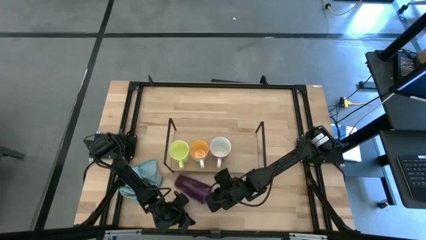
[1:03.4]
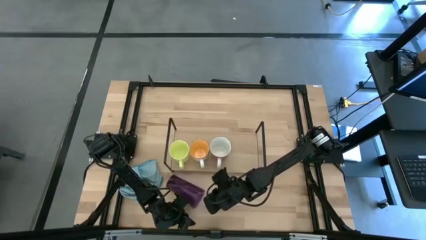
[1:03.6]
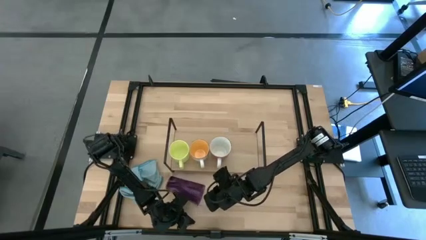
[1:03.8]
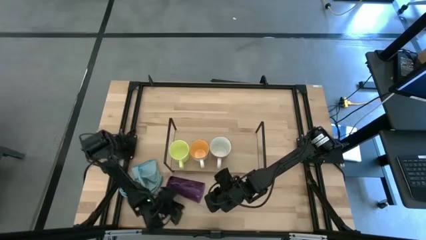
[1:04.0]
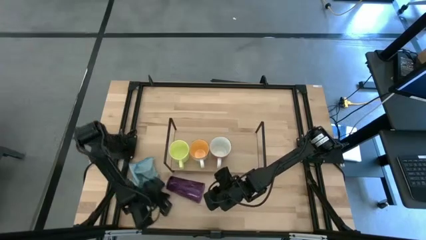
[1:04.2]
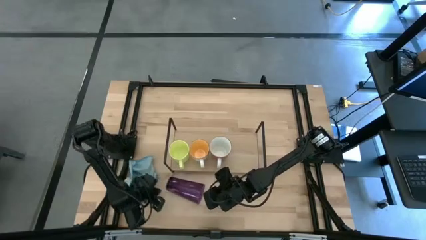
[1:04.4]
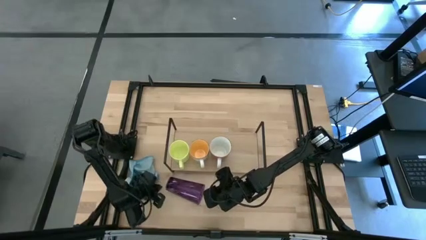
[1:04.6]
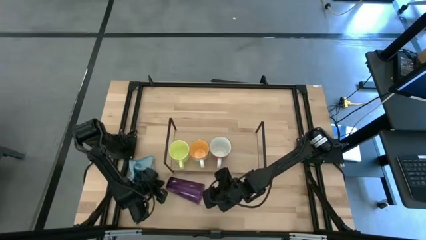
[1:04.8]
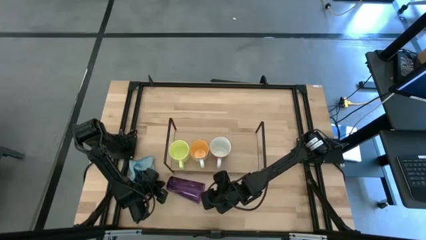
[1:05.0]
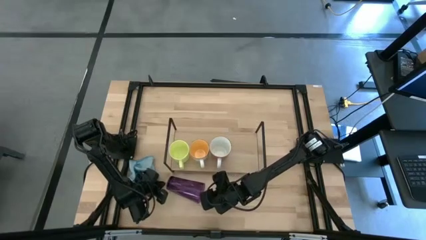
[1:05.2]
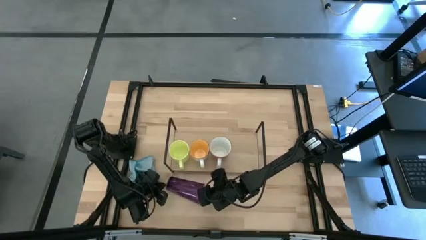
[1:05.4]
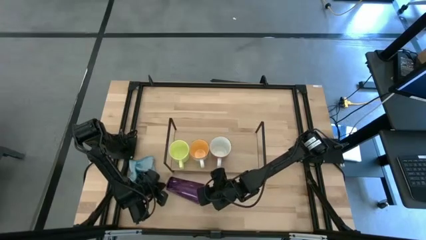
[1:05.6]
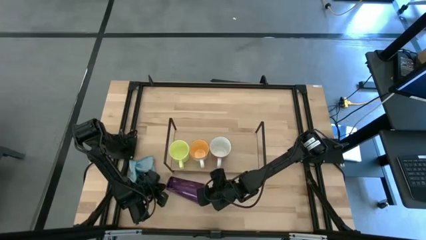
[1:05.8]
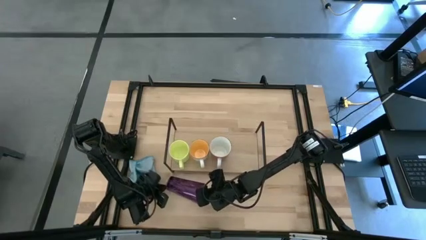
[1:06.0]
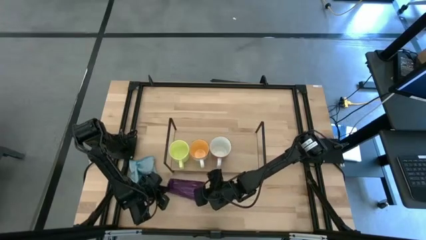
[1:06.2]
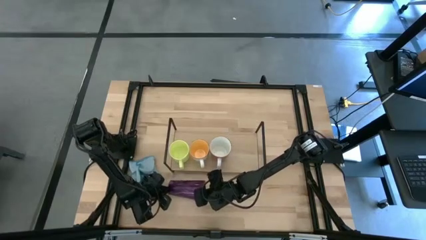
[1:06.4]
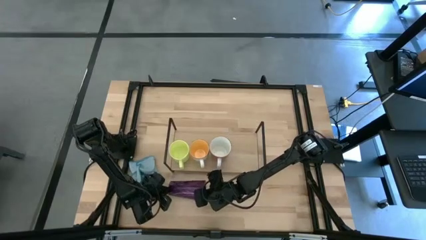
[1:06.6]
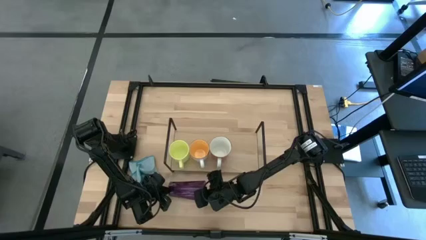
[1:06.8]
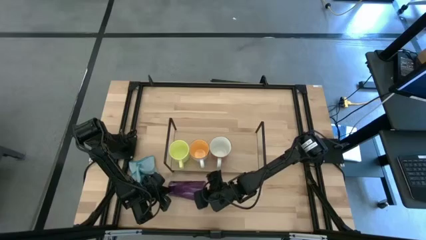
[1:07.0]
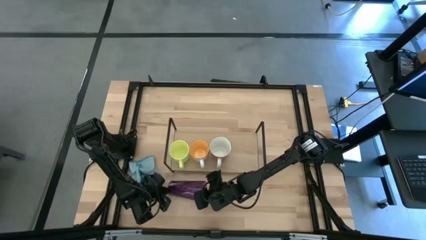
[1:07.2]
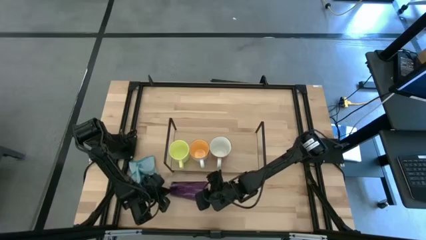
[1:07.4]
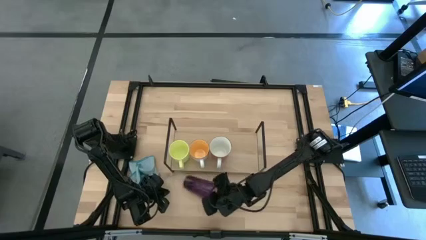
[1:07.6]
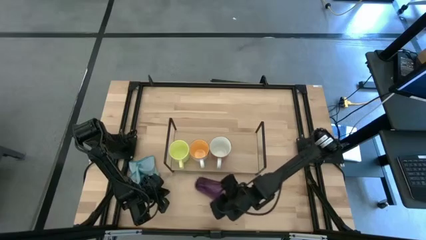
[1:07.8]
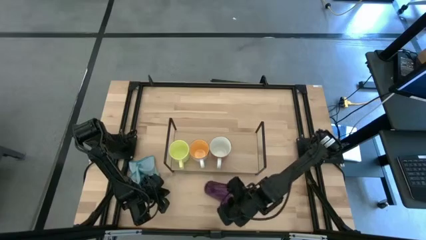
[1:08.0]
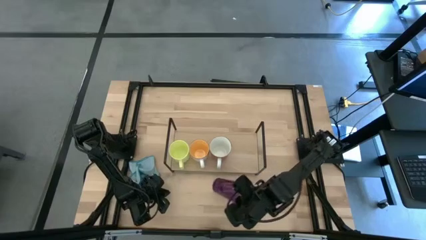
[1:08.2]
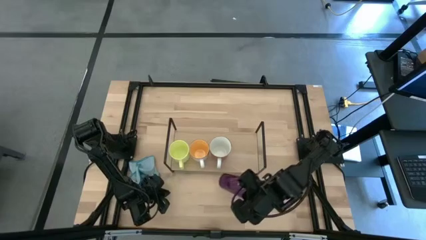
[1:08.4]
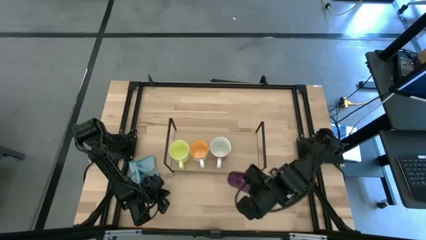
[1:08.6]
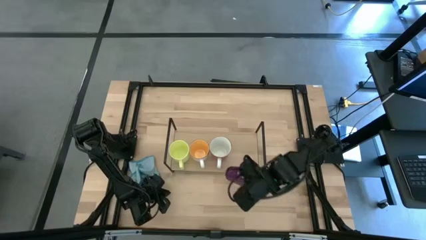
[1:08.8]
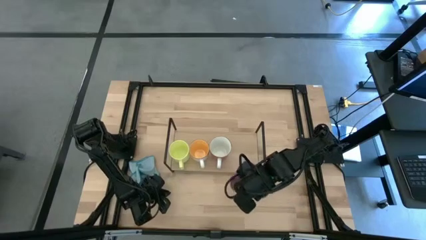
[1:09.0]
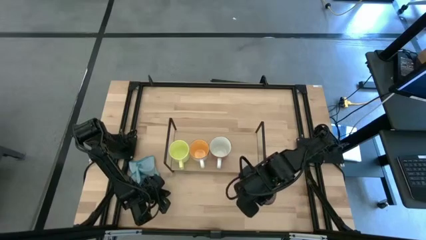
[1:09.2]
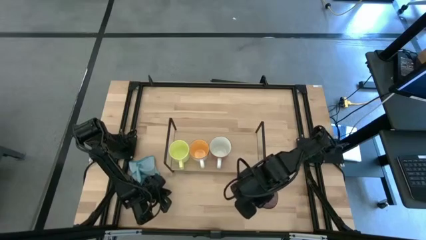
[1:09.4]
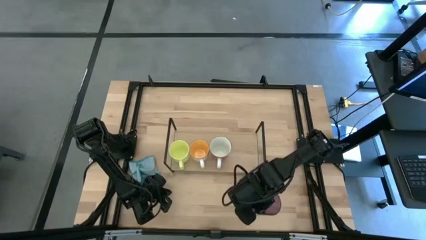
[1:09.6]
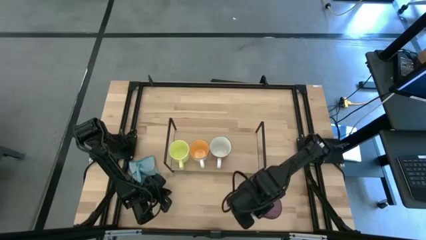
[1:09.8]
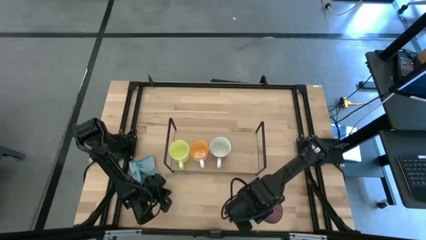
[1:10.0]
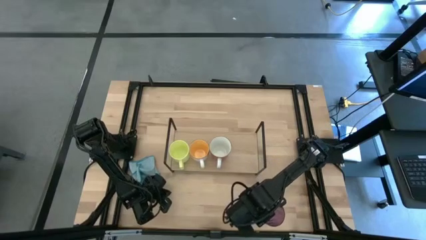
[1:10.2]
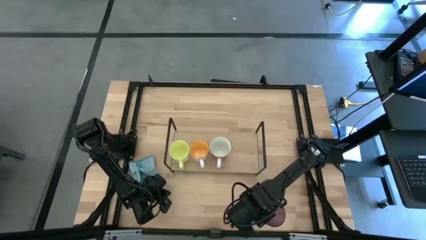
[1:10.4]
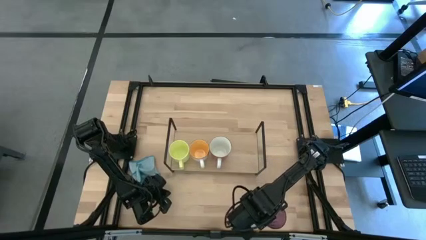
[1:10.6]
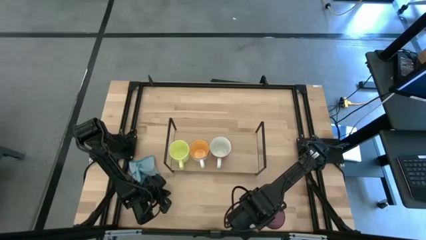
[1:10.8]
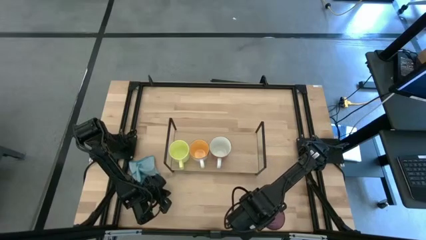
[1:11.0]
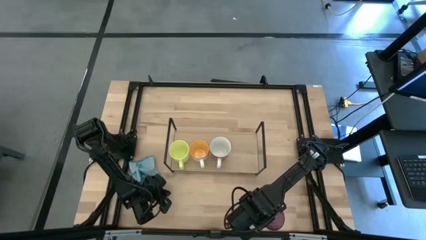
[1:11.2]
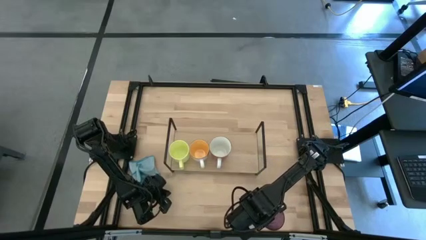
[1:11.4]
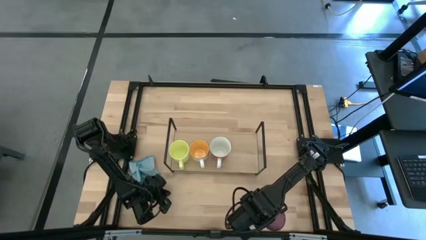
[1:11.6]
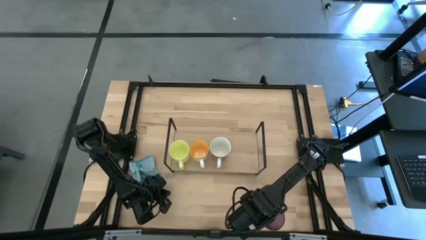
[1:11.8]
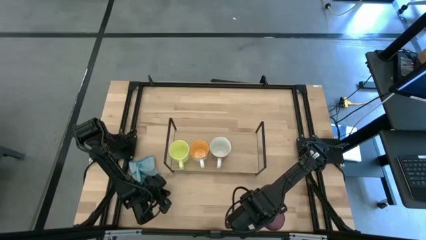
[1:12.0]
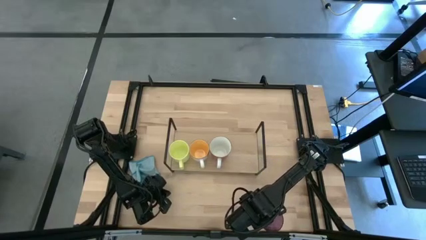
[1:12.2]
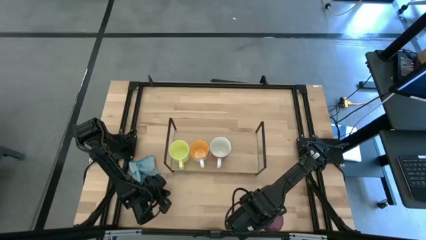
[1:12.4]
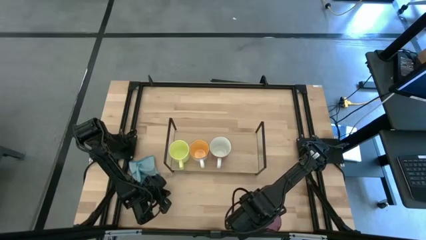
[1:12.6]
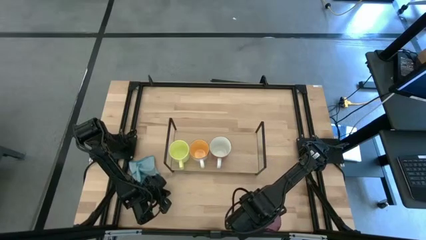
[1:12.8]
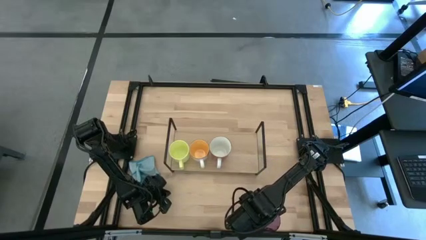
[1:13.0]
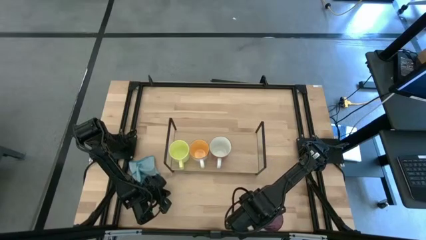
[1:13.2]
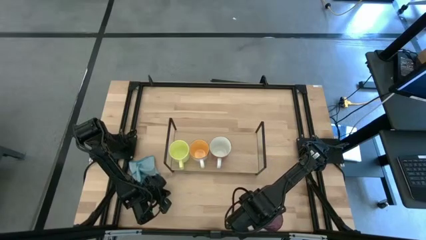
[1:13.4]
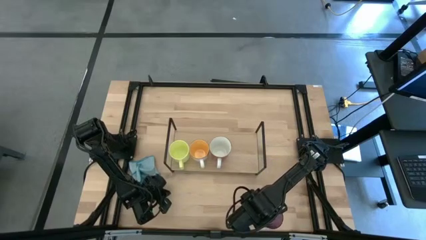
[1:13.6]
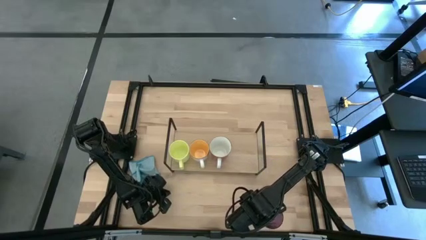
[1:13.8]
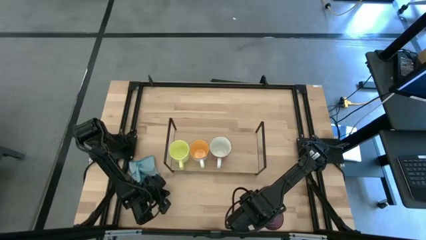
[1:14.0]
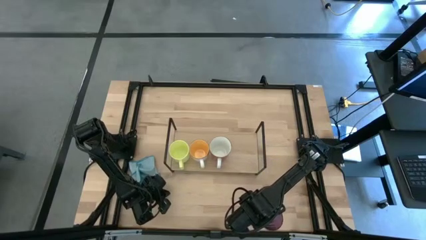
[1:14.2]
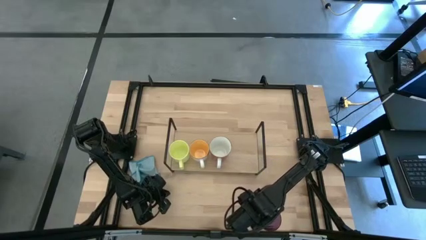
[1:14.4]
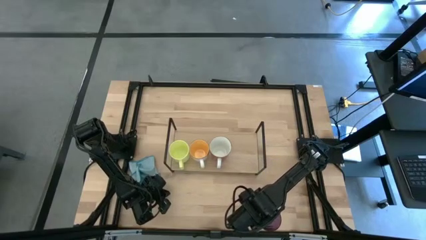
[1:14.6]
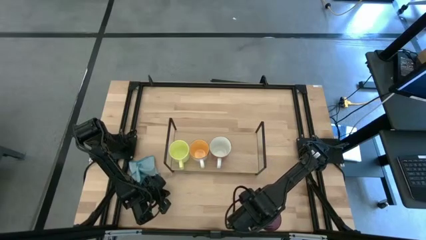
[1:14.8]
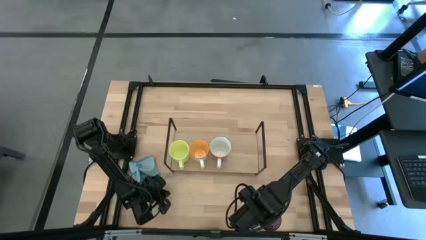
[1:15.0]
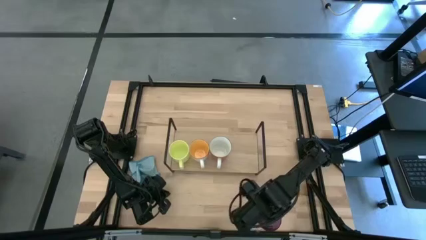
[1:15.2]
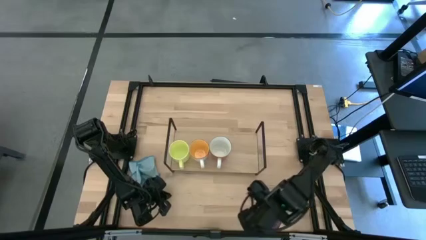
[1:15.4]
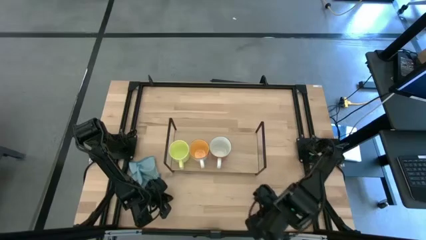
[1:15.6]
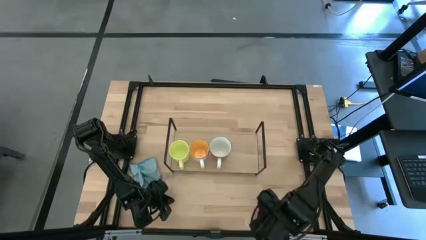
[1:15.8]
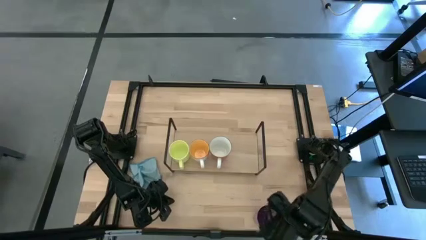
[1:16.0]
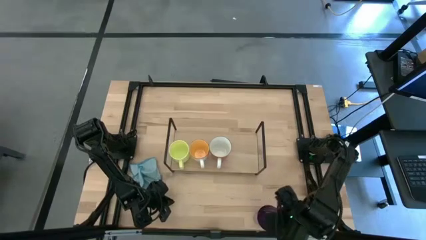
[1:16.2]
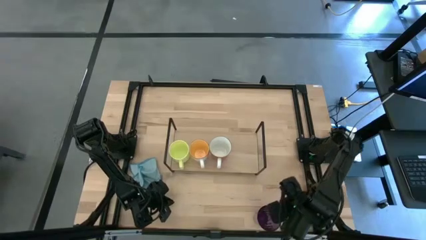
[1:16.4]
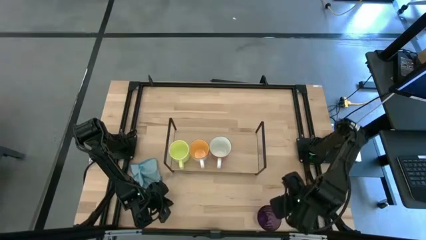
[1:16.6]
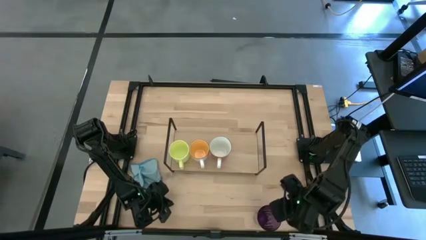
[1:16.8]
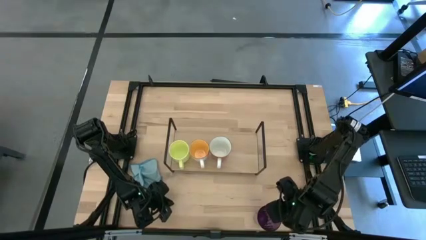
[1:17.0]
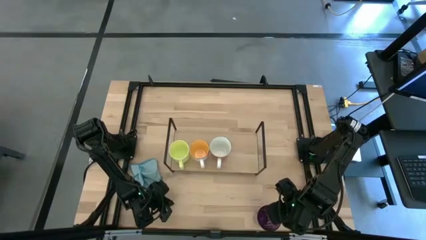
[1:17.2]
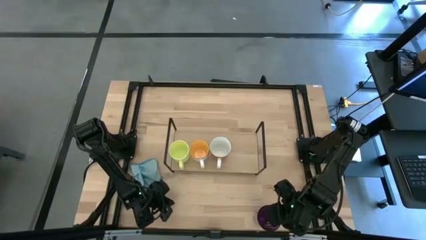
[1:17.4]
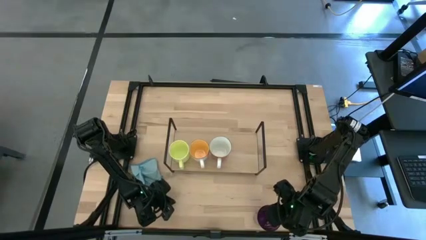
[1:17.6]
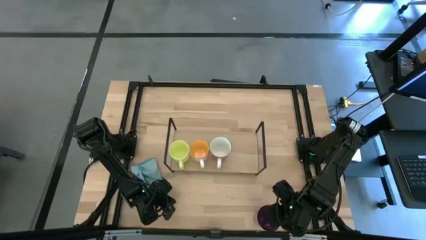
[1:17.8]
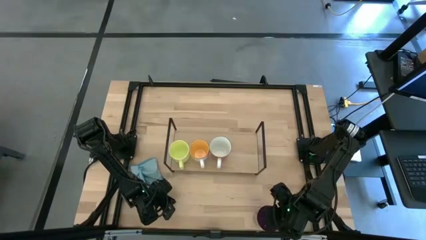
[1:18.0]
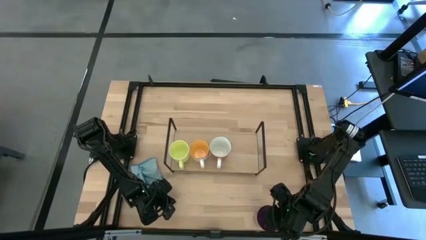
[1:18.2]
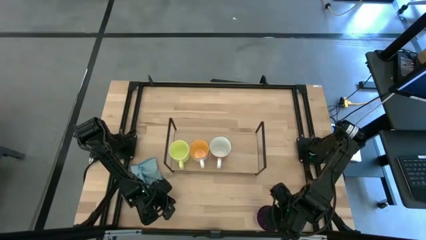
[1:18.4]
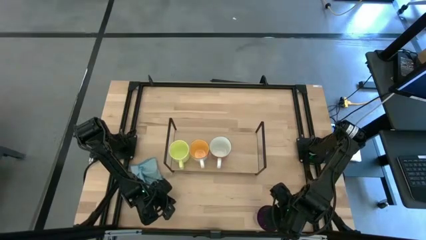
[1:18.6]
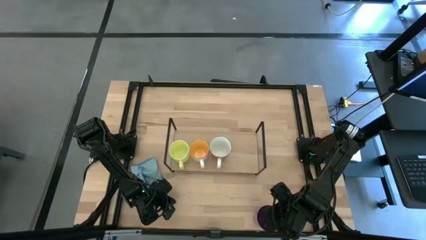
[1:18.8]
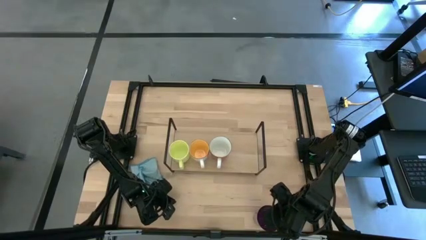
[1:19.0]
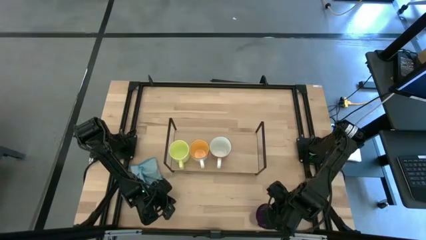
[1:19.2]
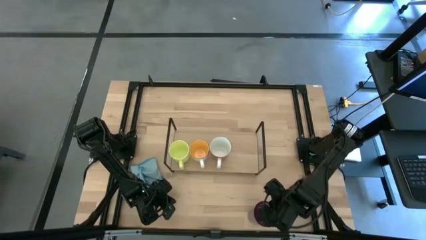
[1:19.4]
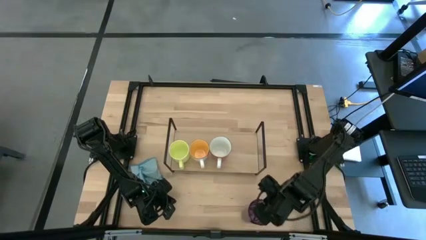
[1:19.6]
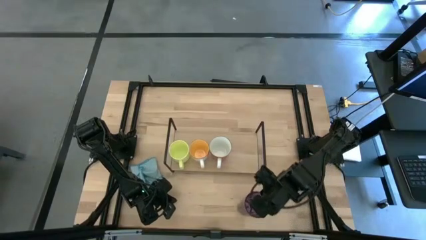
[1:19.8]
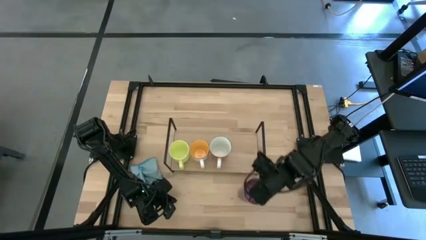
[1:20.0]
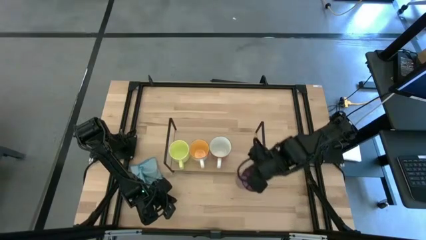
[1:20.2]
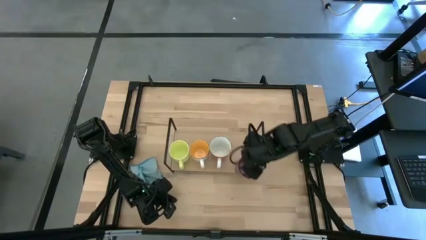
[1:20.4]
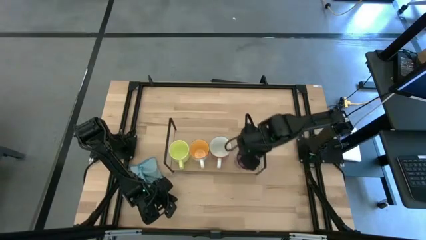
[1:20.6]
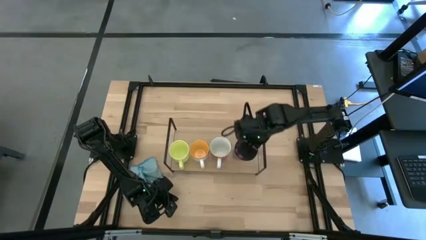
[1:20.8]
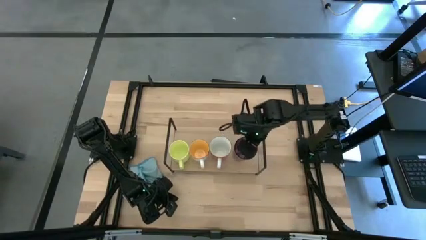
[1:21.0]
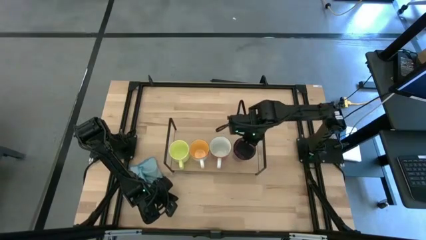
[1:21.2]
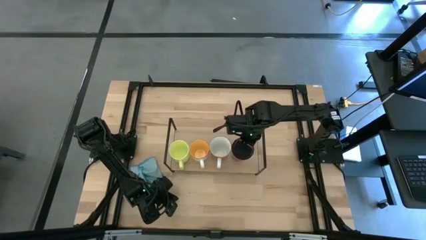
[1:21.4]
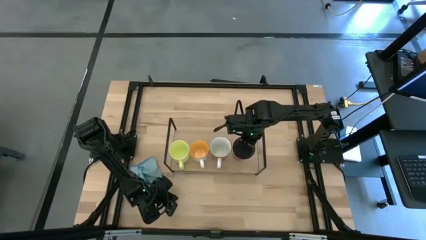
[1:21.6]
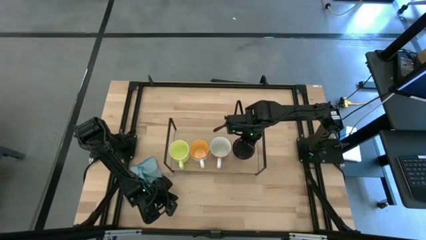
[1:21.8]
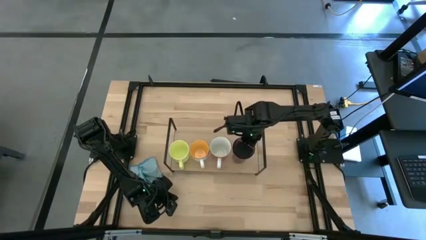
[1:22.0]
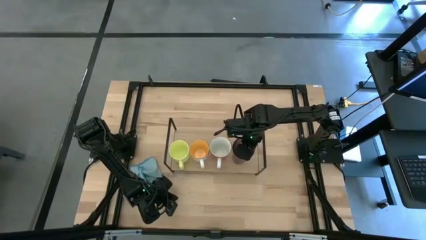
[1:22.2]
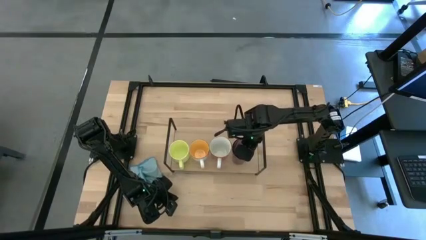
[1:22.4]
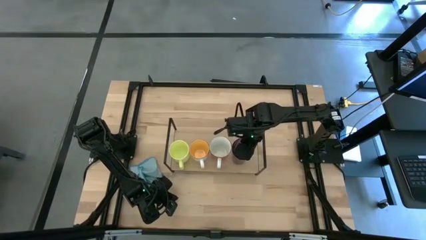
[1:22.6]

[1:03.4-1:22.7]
Task: Stack small to large cups/mugs on shelf
Put the violet cup on the shelf
